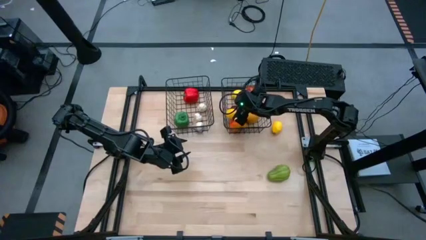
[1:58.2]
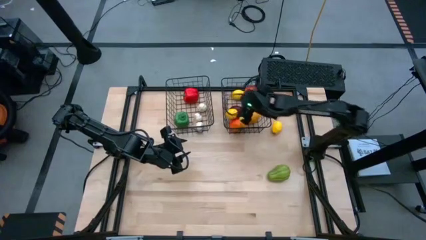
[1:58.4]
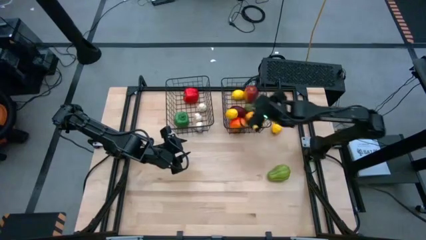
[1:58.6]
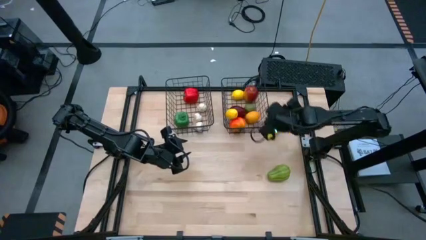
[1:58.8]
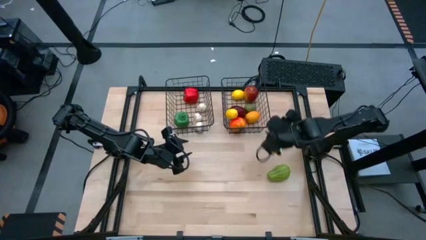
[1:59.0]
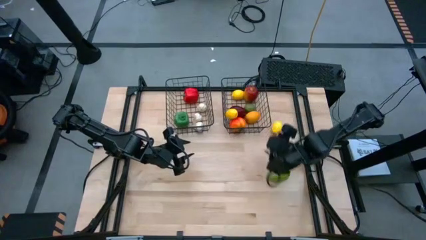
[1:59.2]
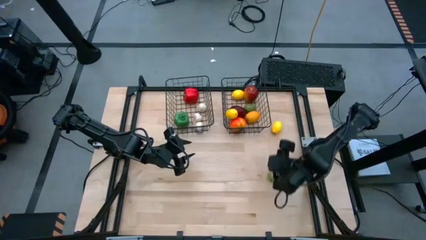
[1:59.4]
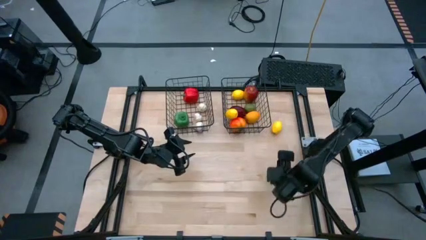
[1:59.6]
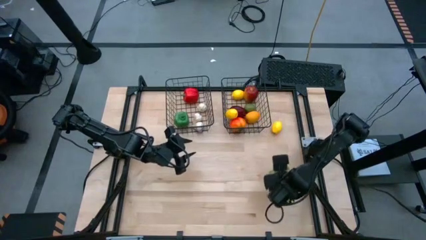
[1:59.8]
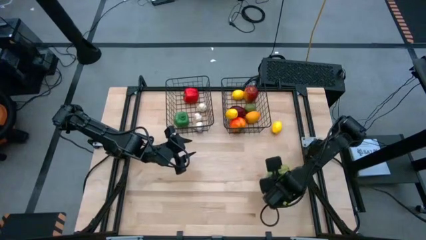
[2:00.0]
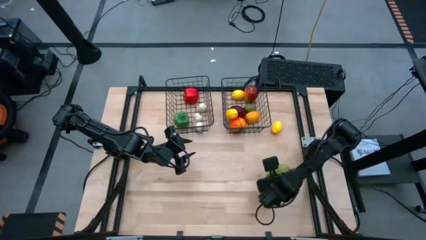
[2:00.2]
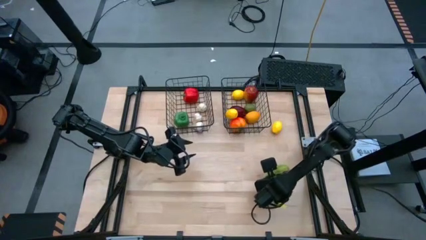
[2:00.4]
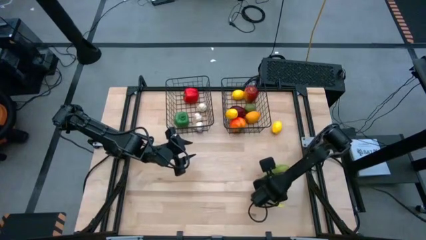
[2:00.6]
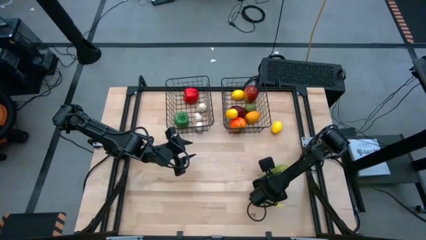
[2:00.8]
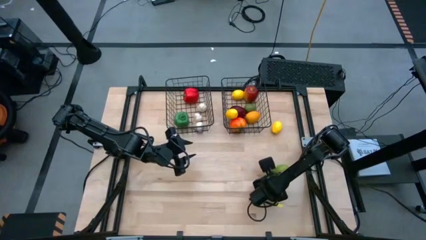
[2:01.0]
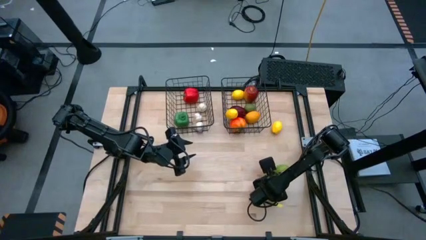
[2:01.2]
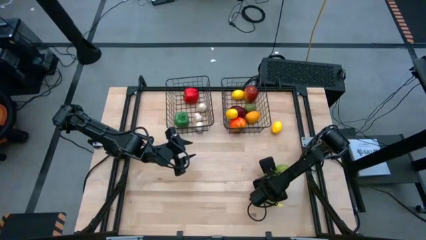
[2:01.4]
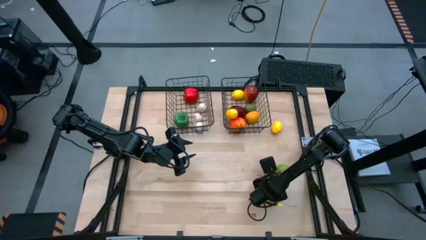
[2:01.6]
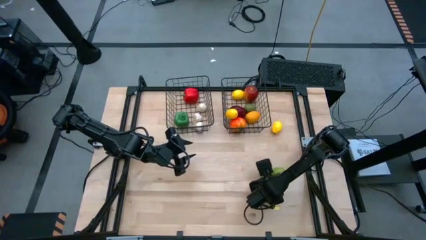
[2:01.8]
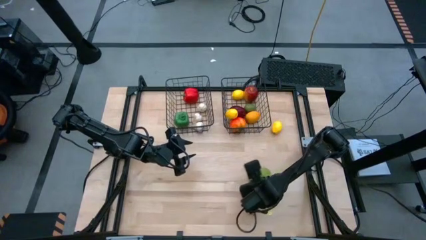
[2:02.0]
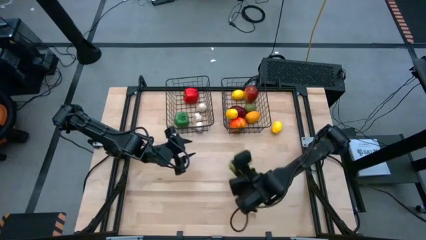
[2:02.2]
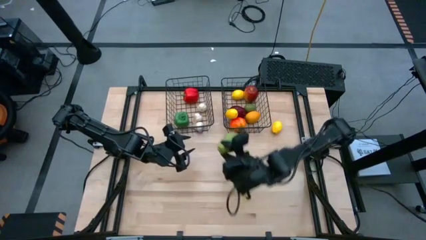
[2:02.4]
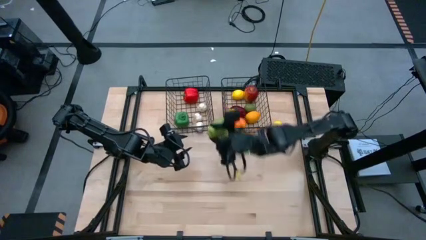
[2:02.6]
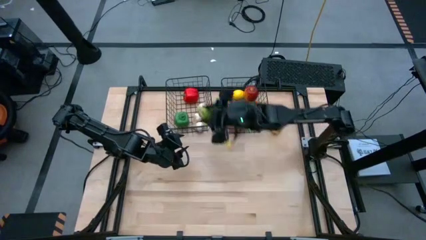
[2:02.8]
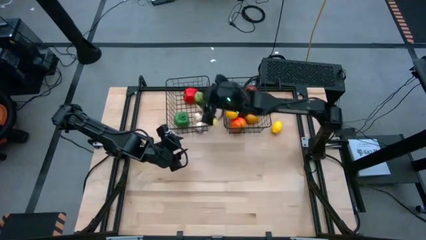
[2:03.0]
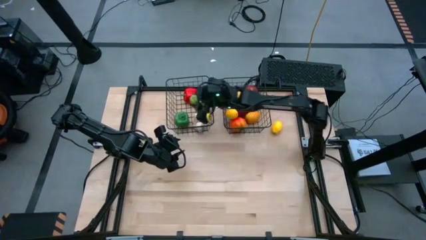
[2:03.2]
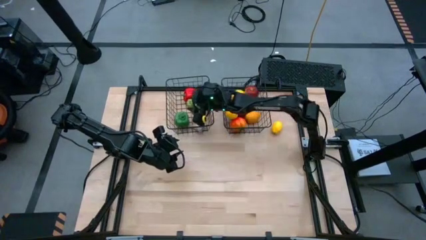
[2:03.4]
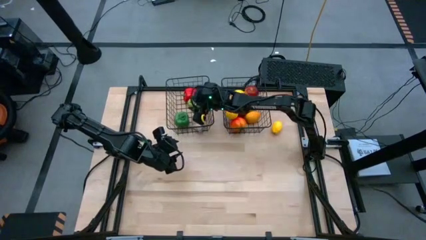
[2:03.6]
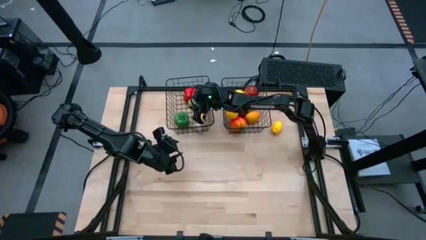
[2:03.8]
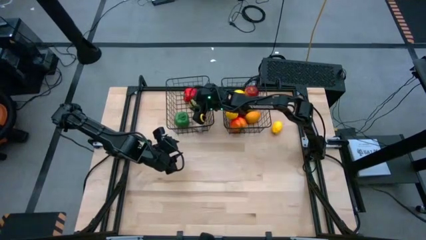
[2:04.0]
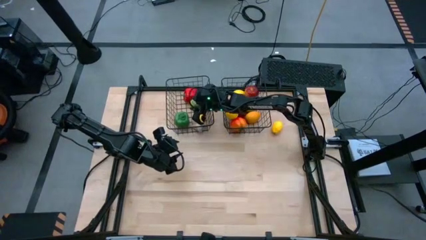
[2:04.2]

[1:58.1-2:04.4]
Task: Sort produce into baskets
Put the green chayote into the left wire basket

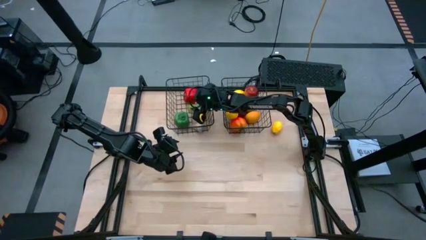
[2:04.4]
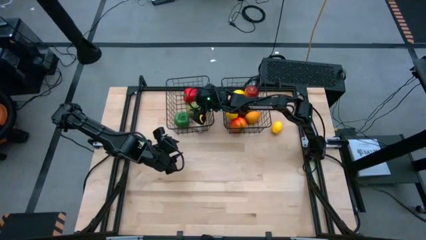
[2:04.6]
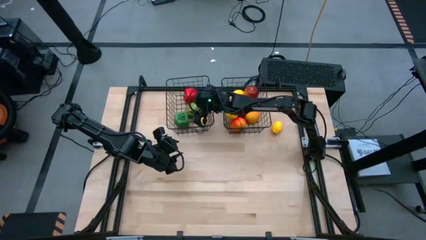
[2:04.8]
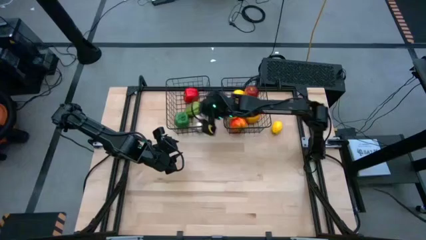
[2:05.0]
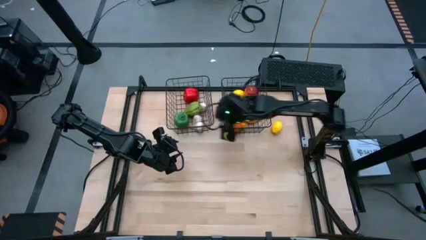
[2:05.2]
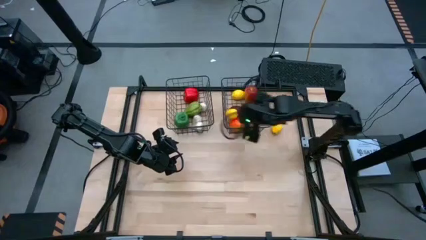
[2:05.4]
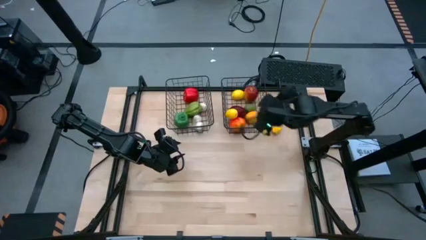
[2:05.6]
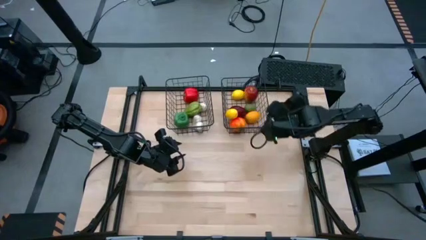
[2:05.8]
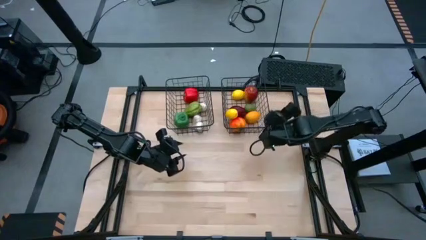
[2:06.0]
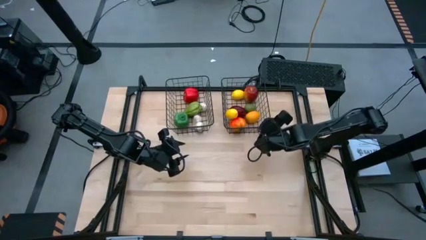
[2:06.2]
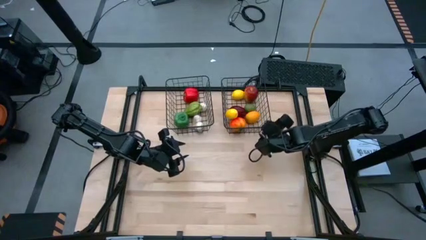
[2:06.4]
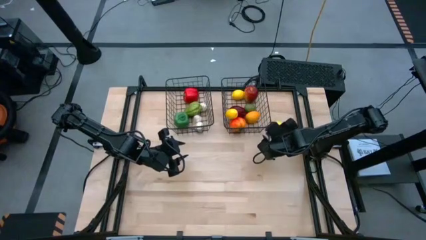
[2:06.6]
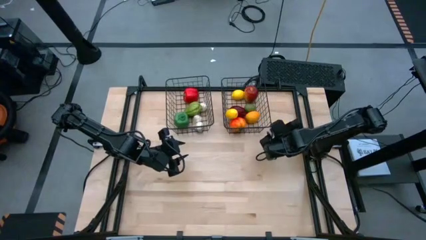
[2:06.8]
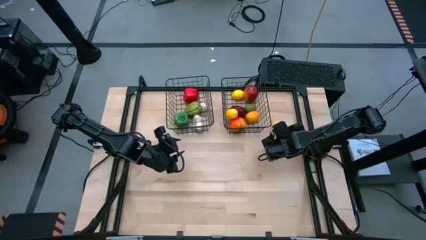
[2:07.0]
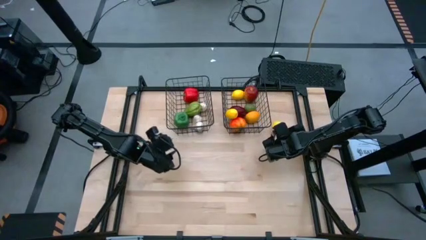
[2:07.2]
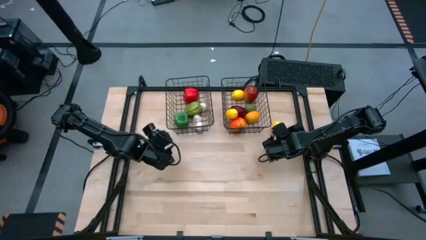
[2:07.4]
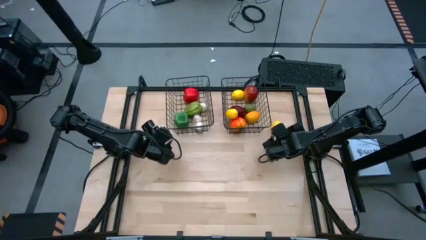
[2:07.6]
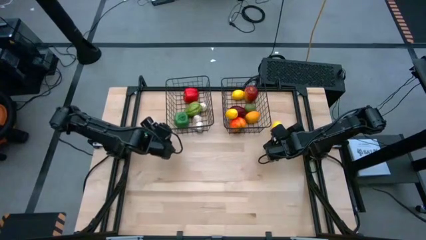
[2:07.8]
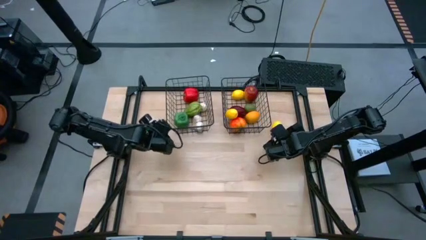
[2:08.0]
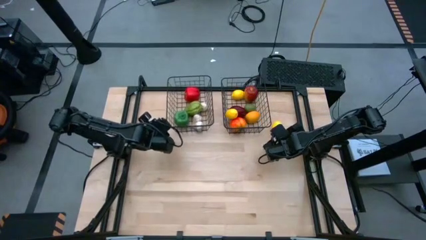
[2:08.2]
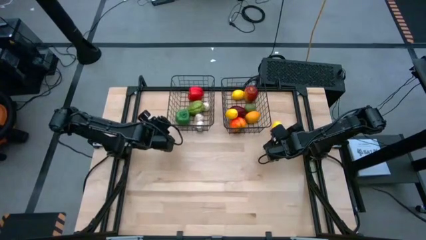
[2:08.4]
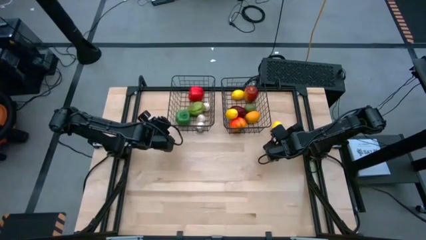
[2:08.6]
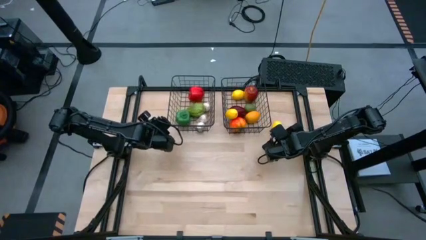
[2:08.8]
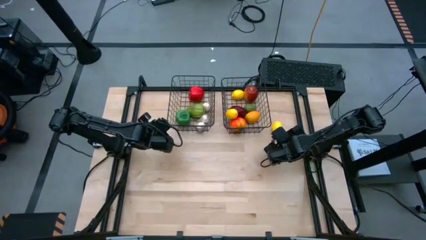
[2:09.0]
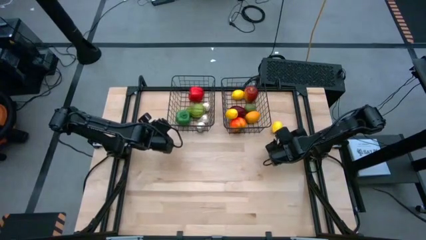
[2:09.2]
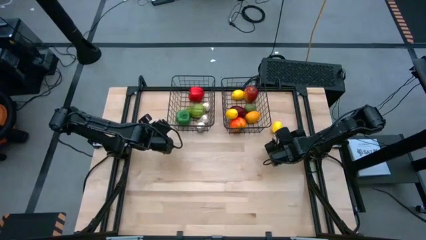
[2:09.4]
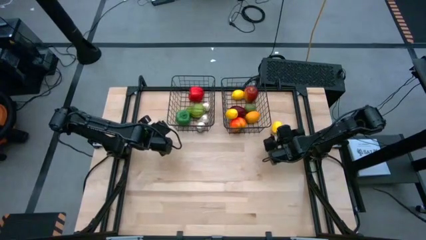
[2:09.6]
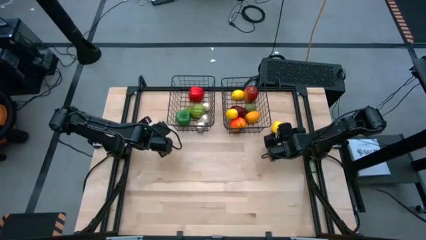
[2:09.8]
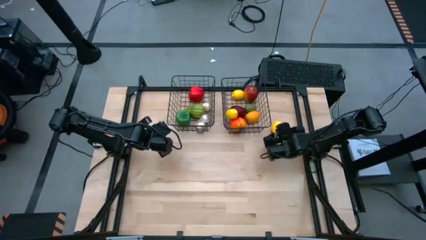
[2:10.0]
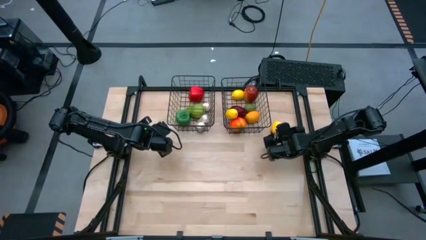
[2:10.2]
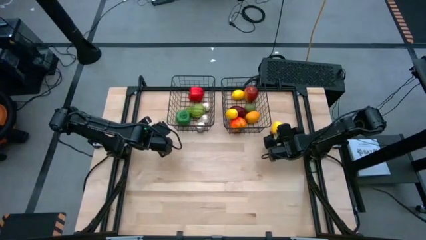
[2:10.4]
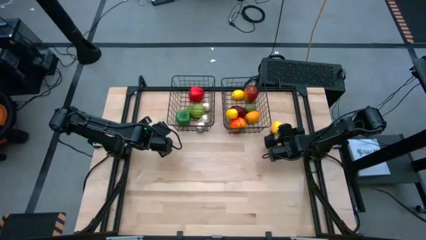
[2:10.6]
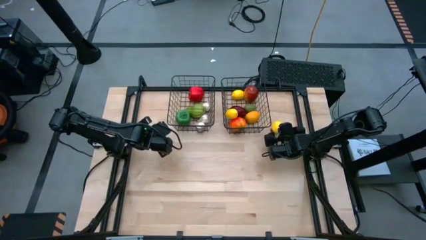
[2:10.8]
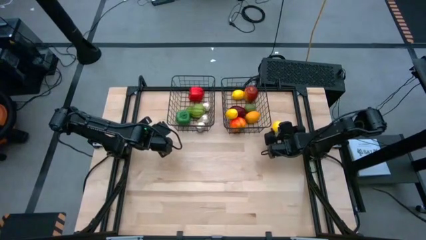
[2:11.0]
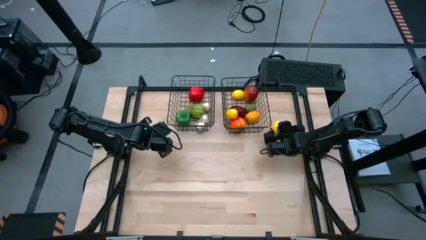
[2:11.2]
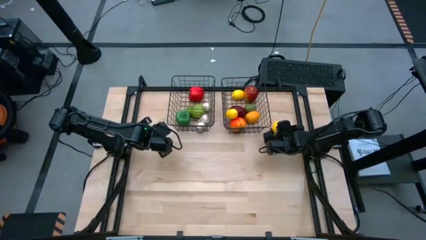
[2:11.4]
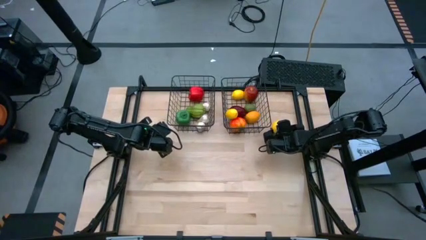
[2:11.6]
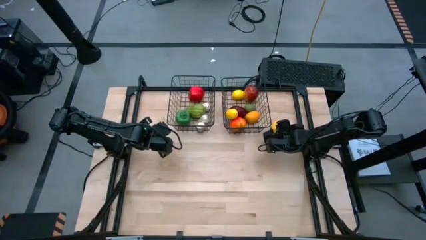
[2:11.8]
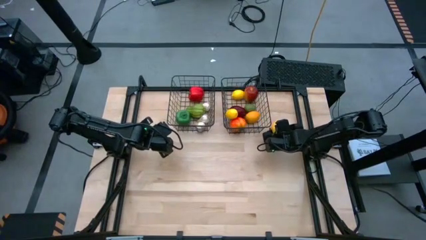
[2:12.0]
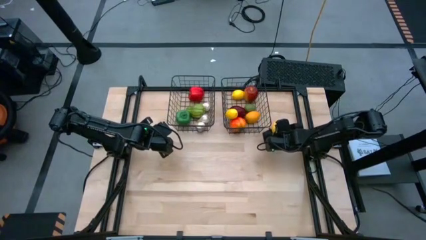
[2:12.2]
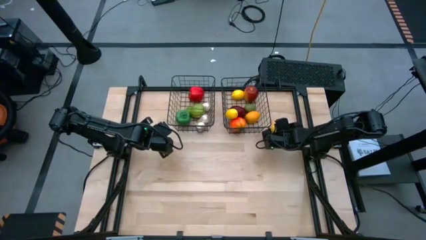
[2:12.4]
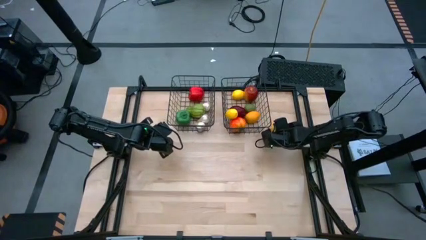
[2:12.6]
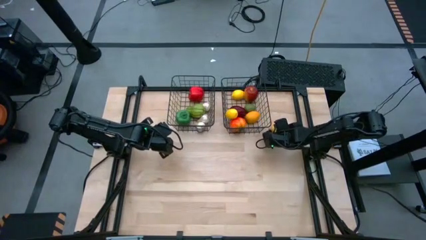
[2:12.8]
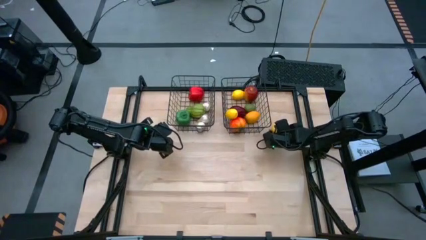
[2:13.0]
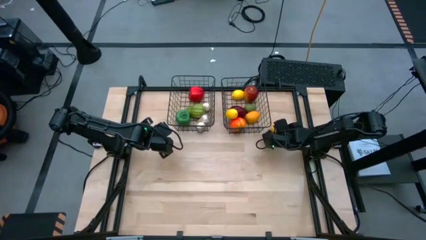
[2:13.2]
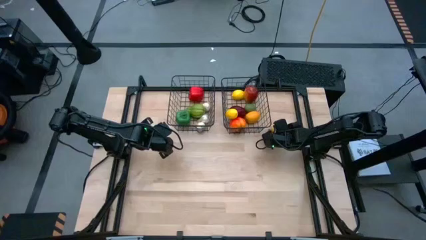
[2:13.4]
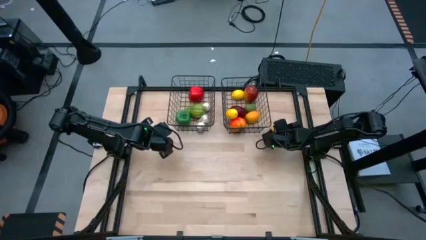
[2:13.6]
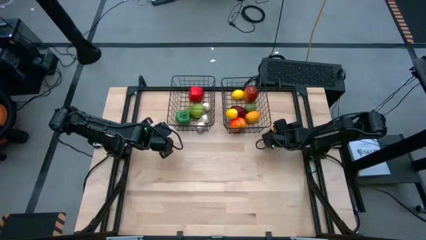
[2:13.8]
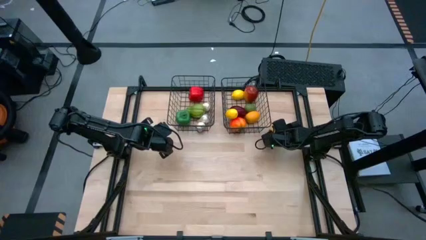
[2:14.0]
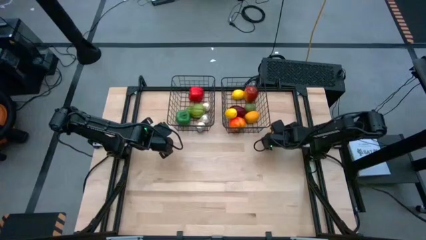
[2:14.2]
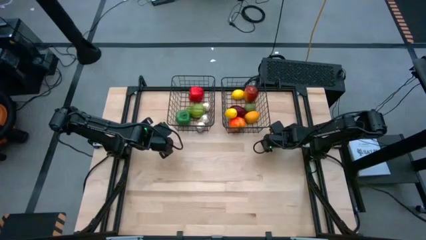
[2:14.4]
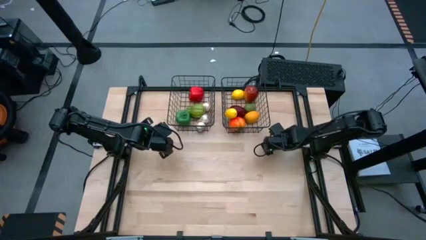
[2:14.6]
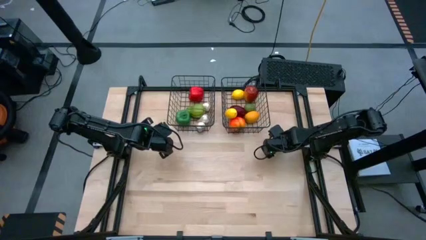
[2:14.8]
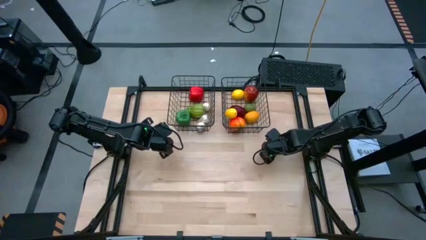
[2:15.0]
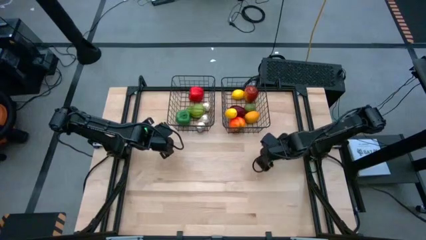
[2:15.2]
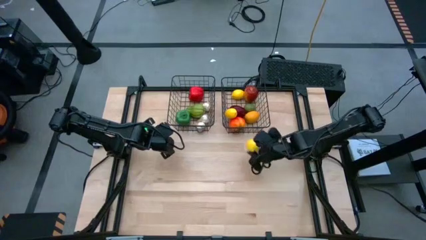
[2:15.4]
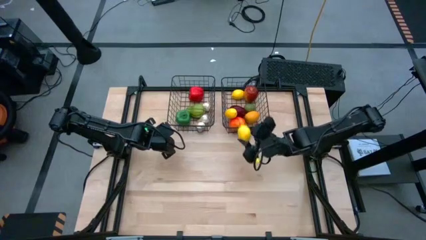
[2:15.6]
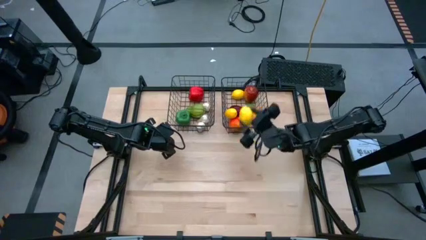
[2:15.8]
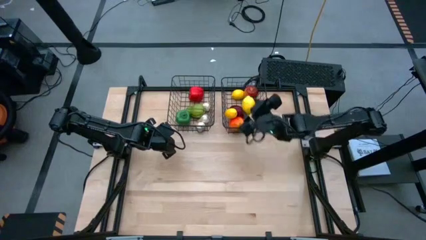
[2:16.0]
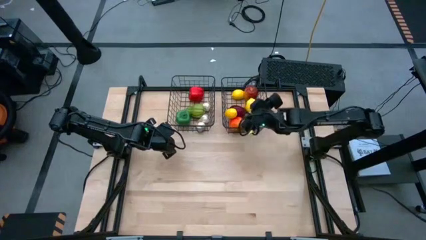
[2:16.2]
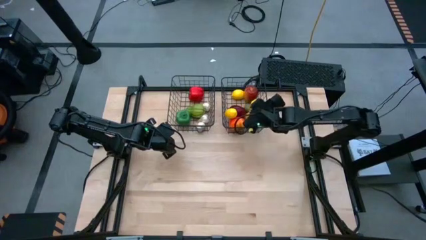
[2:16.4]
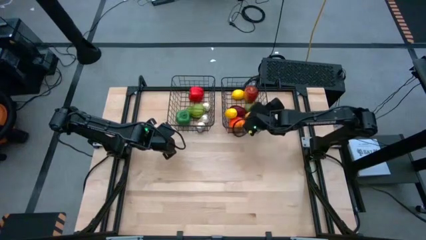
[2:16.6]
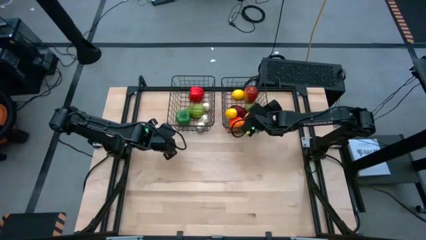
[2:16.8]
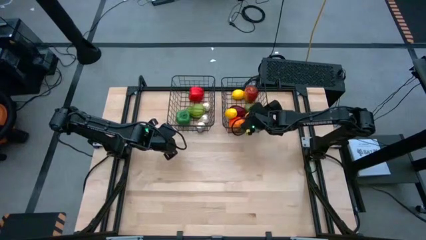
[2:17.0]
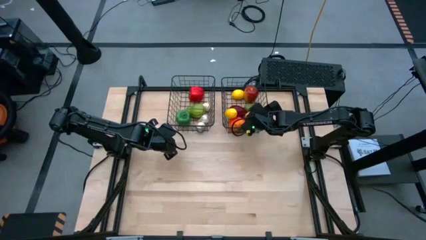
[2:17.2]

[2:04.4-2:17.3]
Put the yellow lemon into the right wire basket
